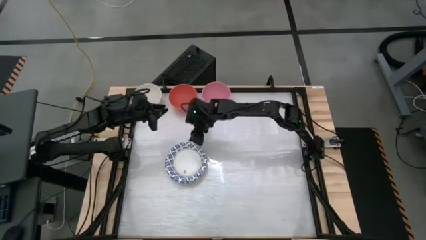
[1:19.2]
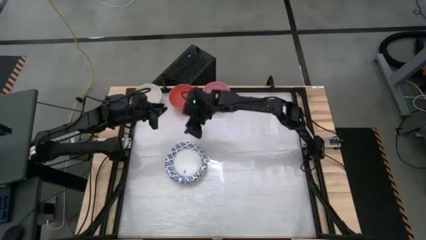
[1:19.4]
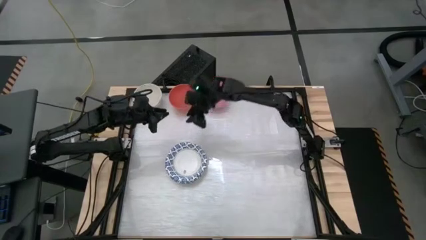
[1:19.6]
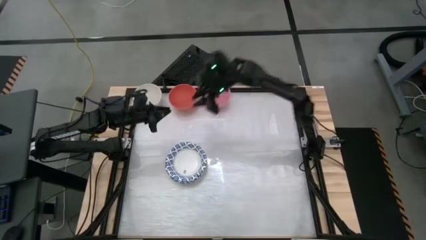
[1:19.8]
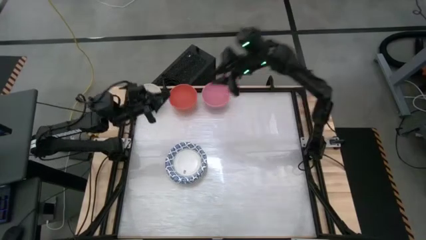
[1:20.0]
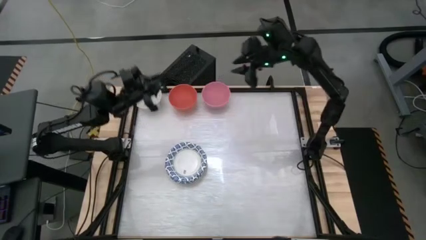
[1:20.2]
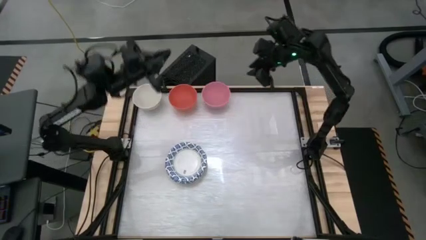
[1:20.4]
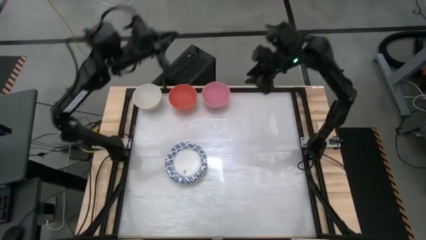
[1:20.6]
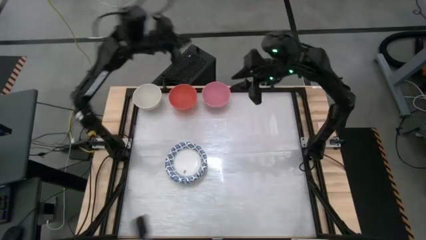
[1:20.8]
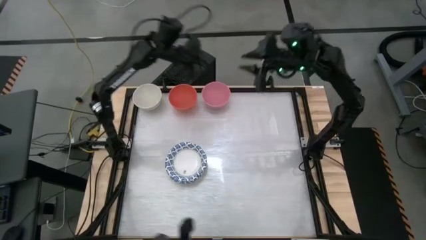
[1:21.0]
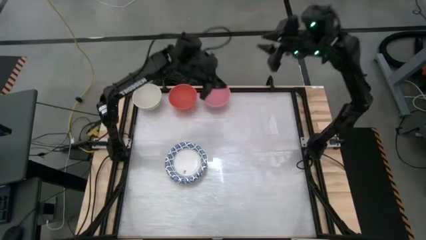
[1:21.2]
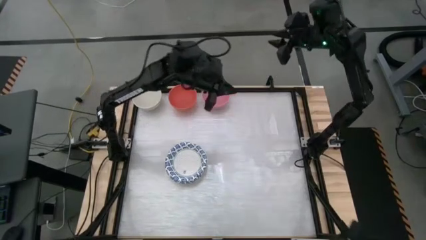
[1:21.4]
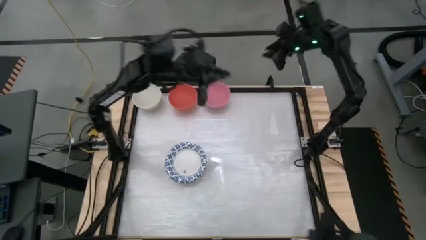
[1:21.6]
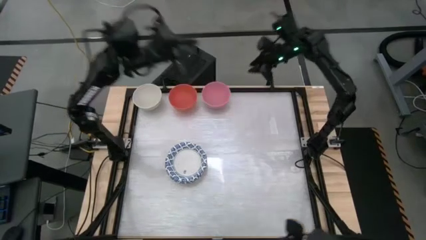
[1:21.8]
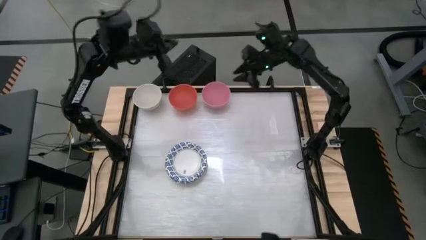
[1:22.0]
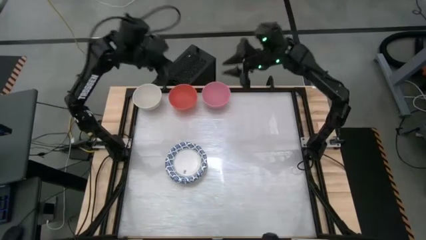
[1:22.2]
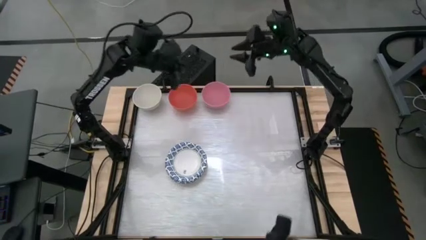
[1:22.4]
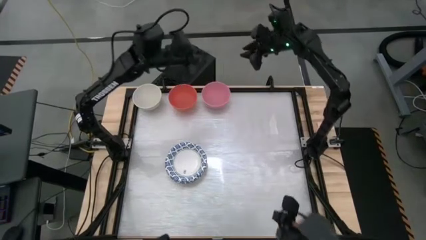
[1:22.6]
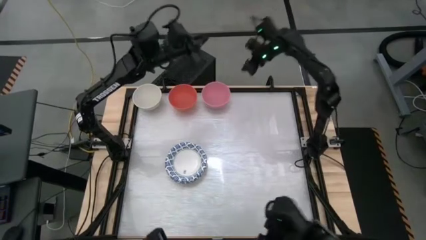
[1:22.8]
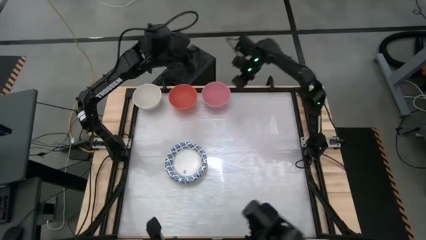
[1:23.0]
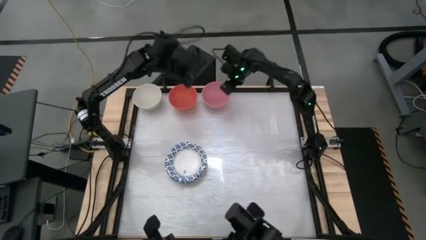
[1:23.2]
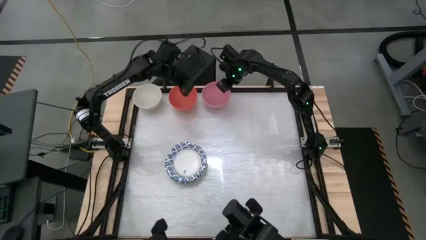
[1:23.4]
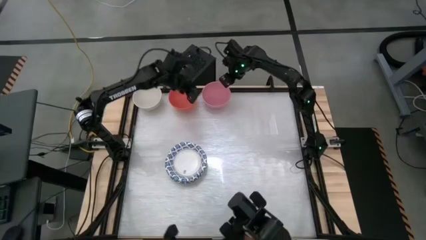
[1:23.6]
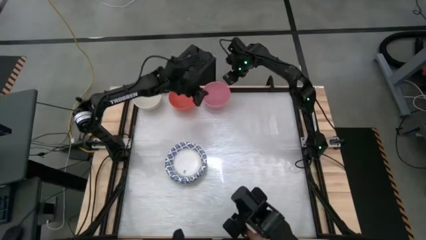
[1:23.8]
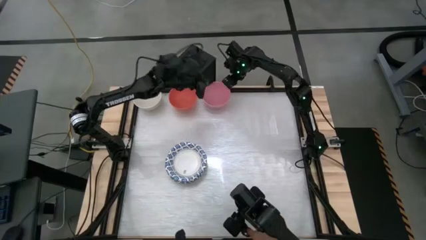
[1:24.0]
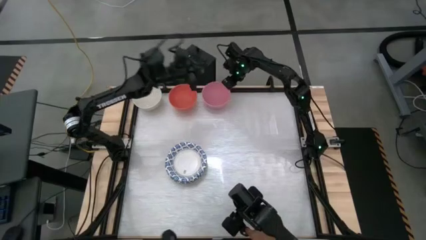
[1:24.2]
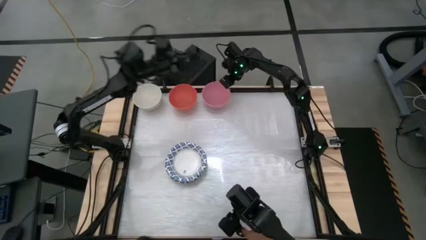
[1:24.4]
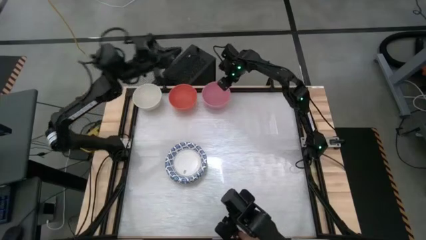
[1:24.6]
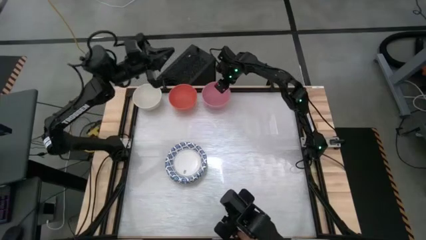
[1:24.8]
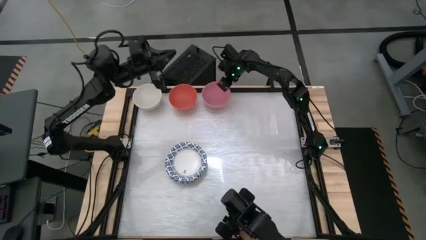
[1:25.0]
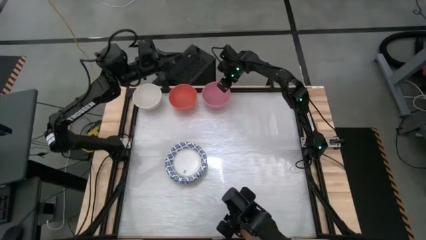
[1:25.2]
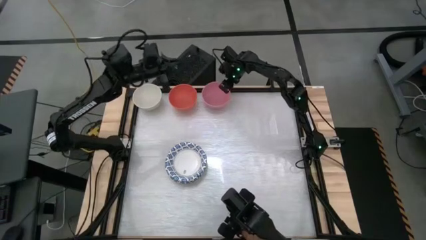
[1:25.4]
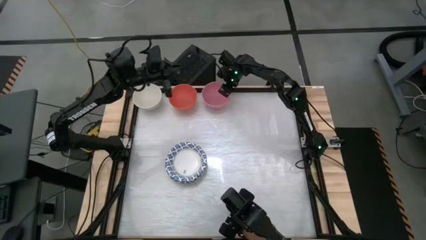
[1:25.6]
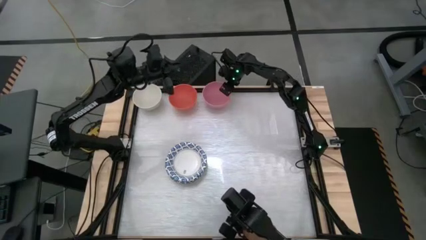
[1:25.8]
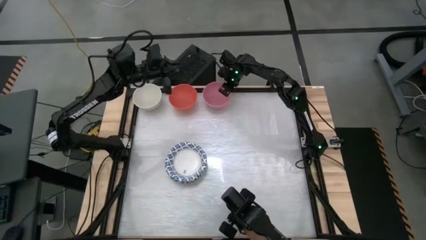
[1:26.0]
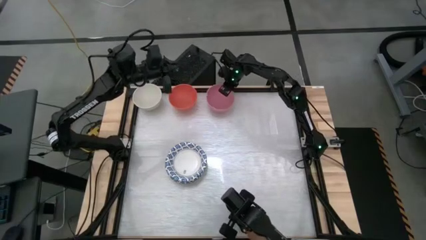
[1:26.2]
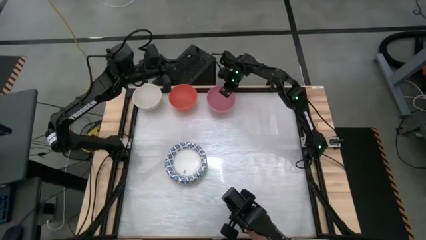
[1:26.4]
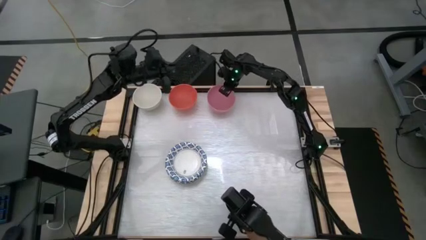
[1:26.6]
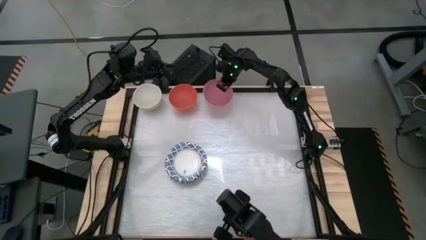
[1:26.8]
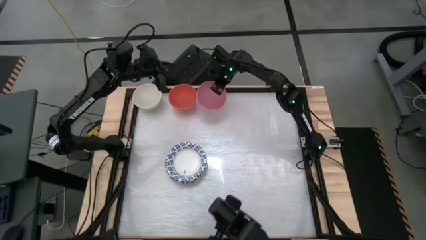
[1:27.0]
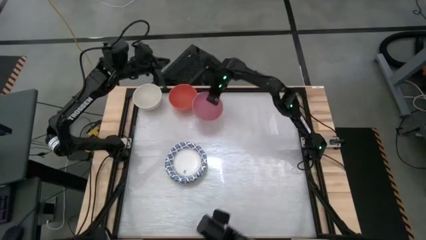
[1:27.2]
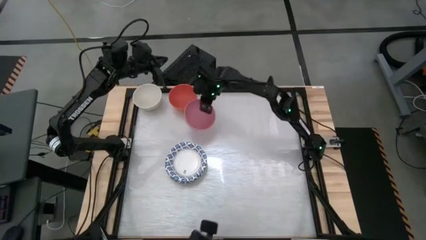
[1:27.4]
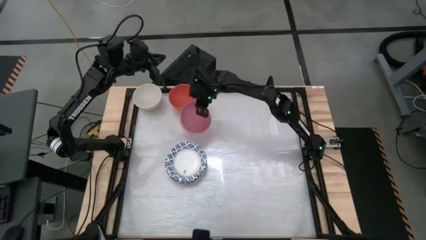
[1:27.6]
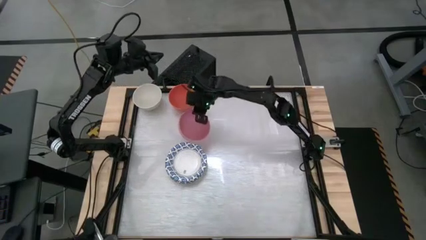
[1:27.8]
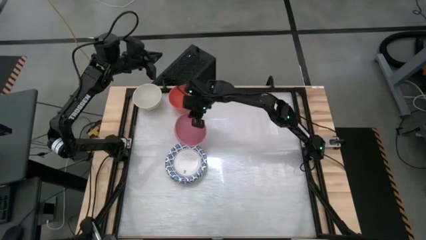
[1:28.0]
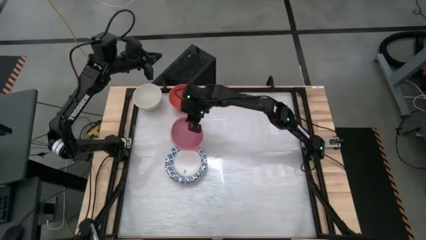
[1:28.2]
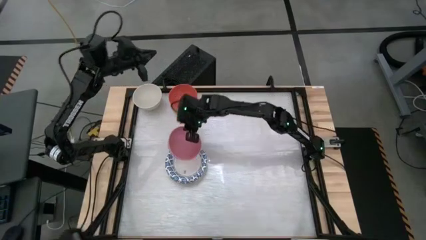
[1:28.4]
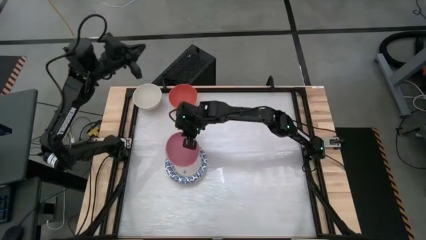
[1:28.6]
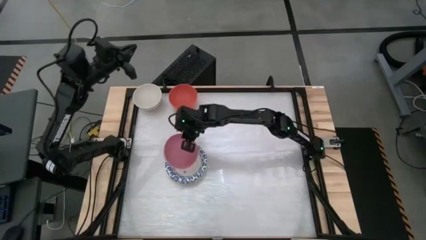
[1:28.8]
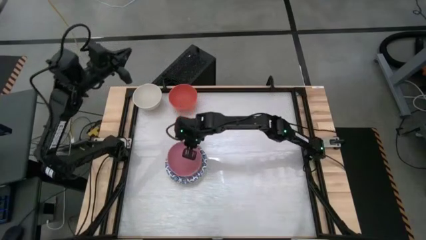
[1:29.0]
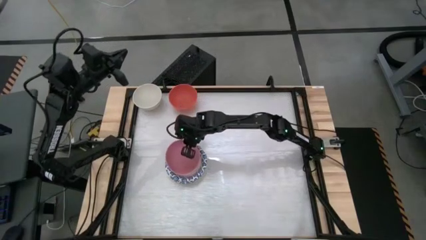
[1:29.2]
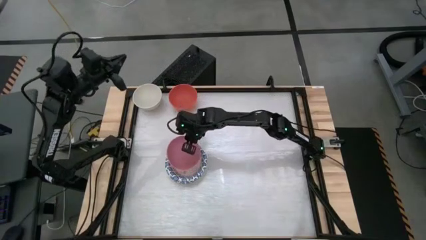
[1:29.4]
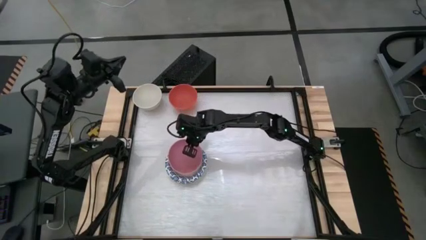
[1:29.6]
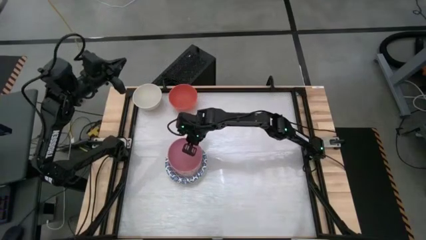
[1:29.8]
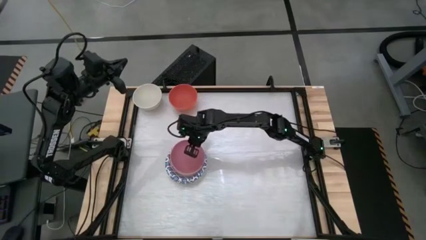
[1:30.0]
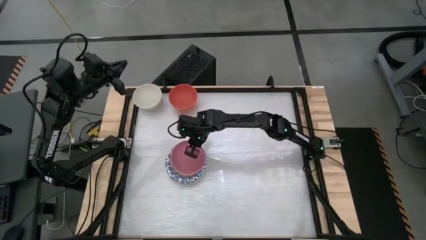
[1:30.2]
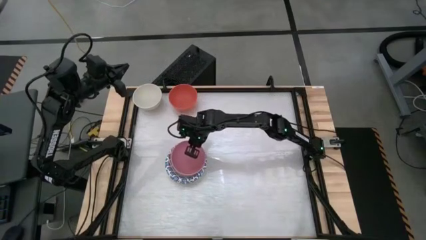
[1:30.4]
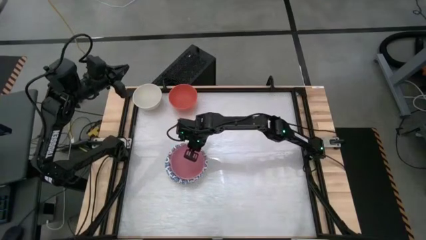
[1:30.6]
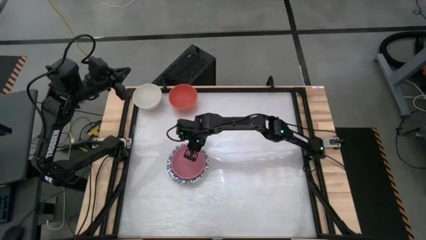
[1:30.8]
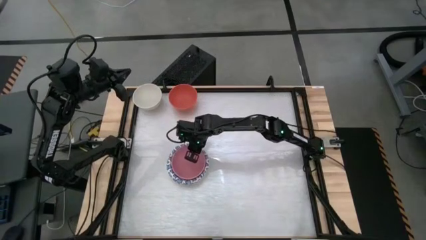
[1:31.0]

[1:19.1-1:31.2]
Task: Nest bowls inside each other by size order
Stack the pink bowl on top of the white patterned bowl

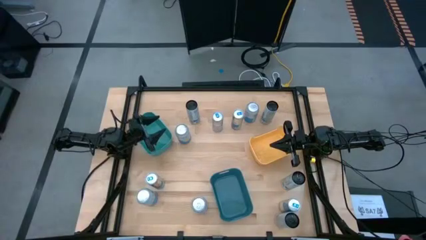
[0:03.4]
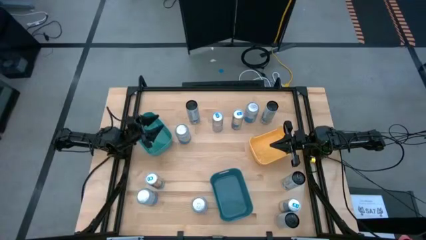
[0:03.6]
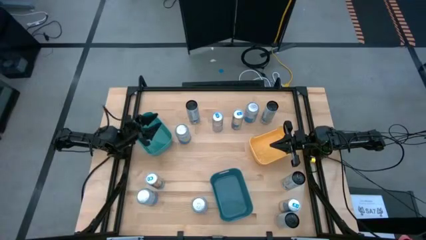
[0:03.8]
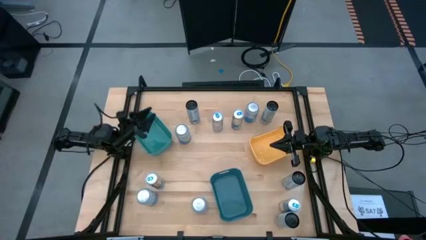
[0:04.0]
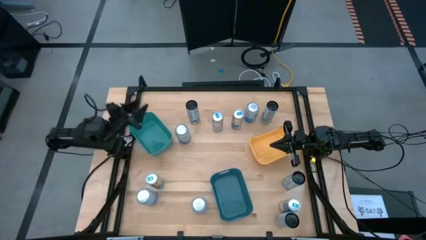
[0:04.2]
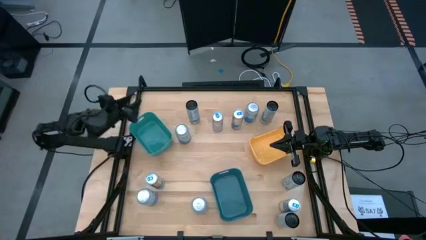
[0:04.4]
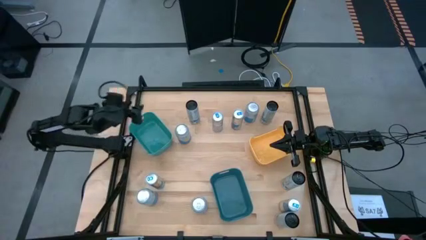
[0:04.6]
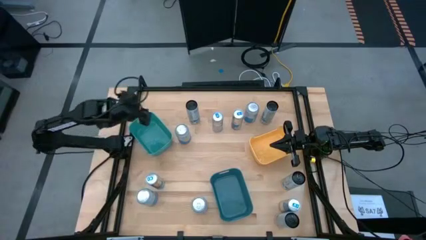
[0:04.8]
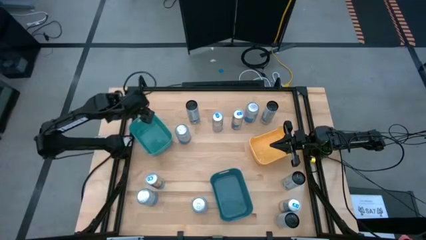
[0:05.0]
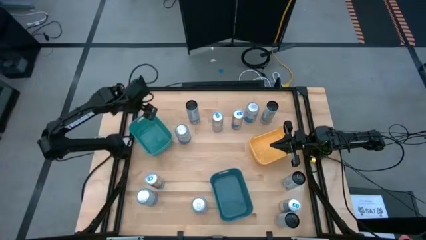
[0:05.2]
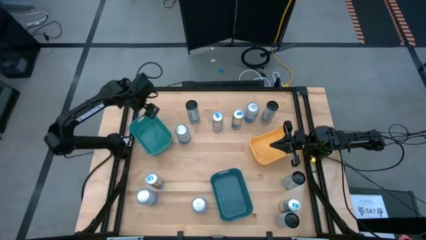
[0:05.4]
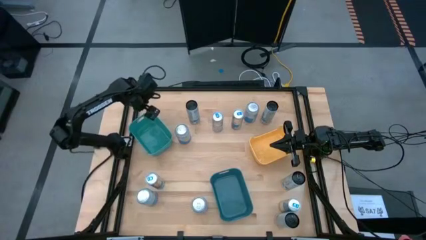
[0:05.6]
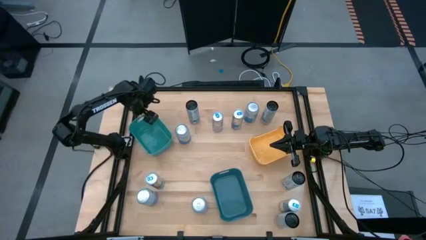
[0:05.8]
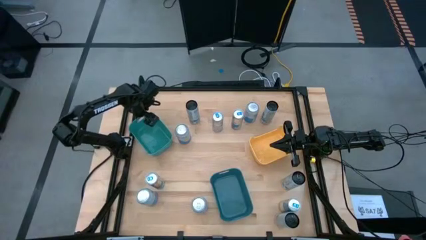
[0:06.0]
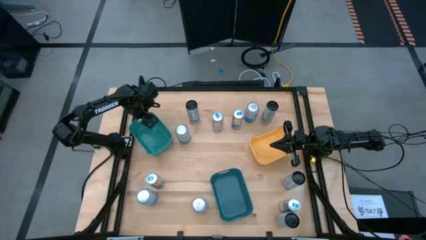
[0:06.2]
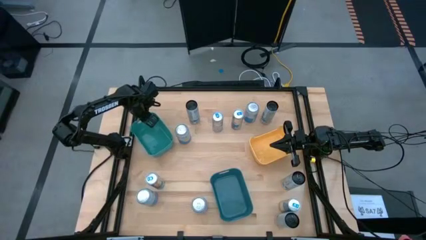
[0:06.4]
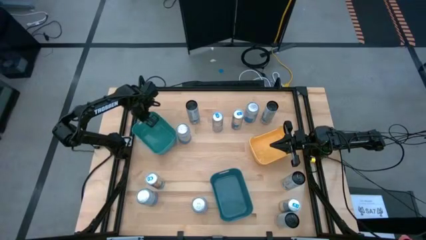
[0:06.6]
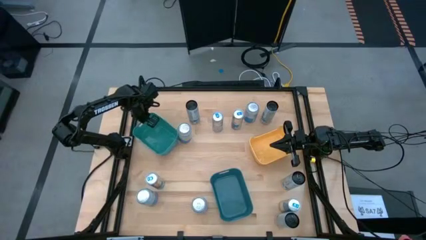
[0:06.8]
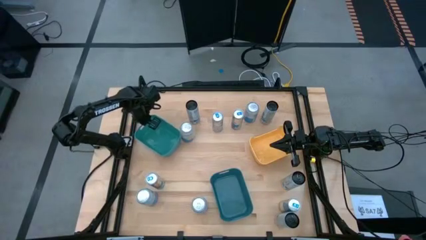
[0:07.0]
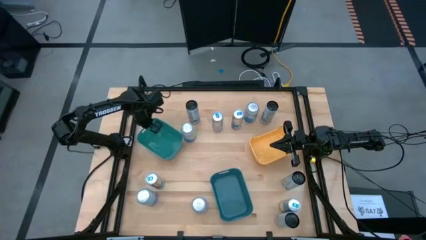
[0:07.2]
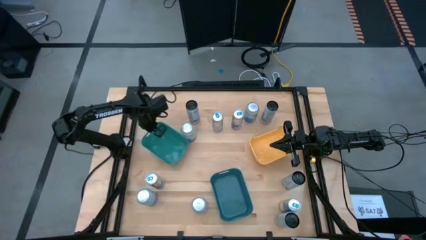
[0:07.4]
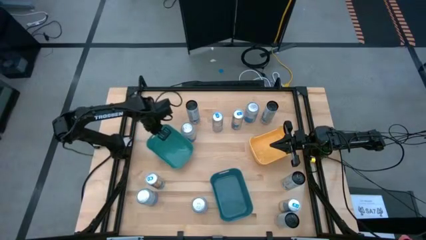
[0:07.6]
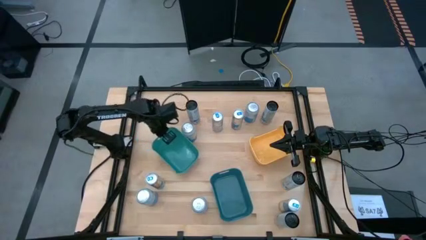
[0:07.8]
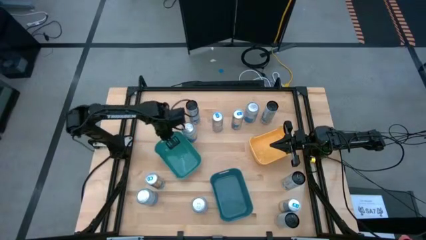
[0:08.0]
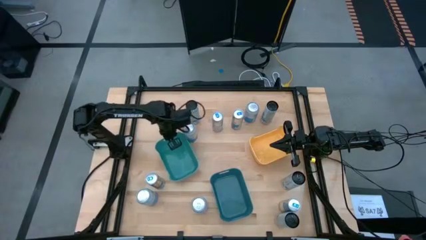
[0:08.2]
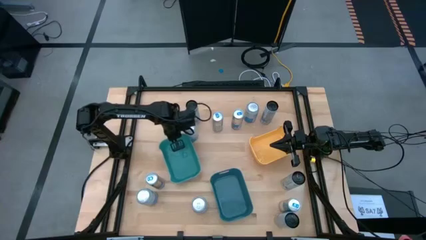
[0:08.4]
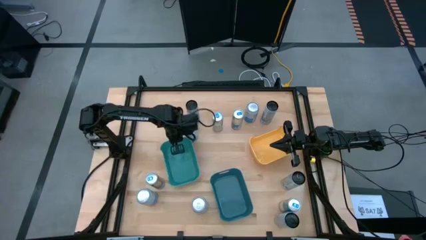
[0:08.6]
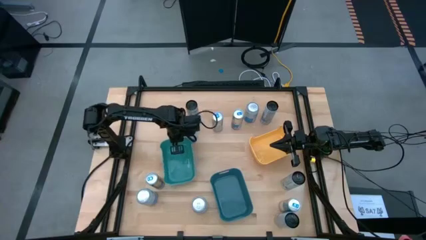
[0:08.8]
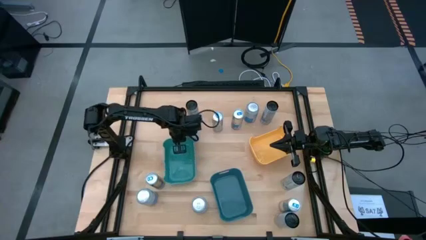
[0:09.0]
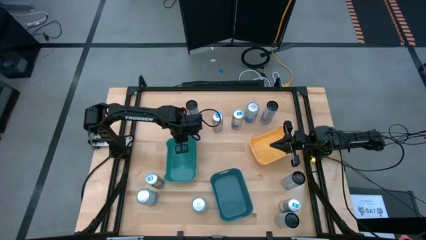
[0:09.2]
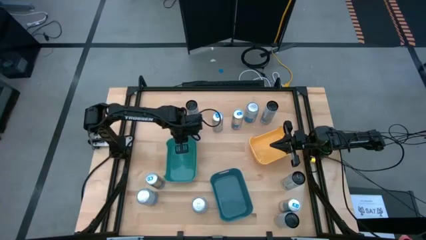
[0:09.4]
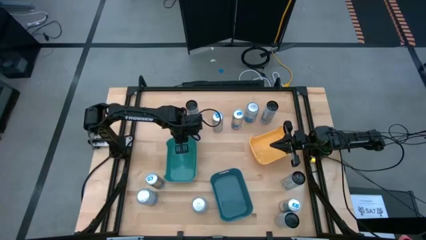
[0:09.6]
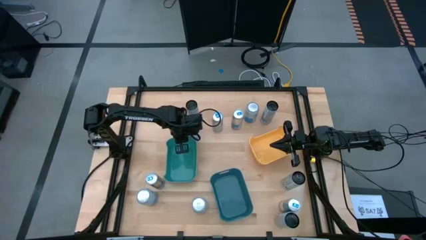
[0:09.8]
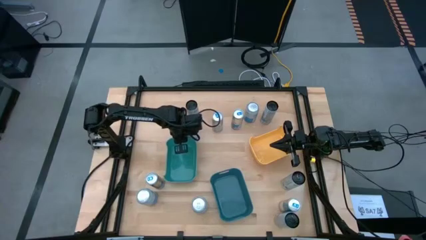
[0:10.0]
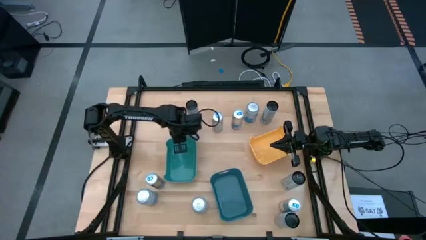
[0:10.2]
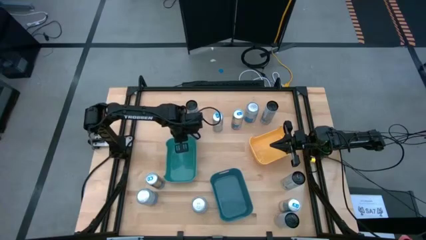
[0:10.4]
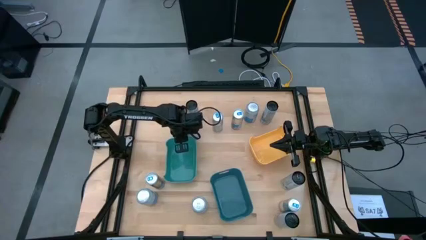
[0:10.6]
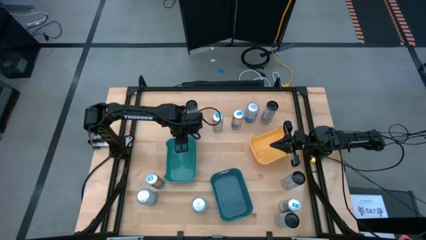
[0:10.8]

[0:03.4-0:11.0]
Task: Sort soda cans
Move the green bin to the middle left of the table
